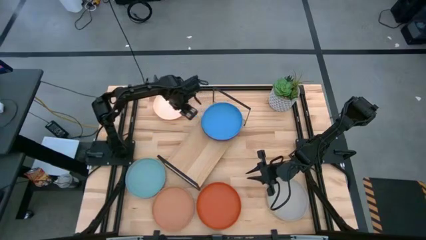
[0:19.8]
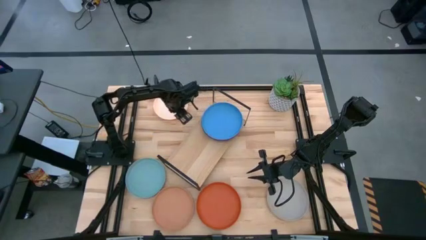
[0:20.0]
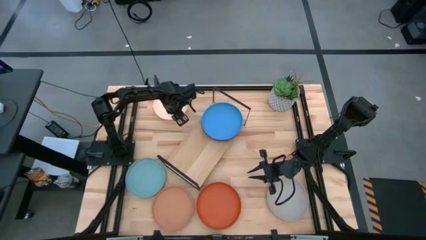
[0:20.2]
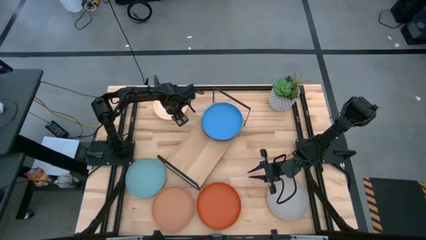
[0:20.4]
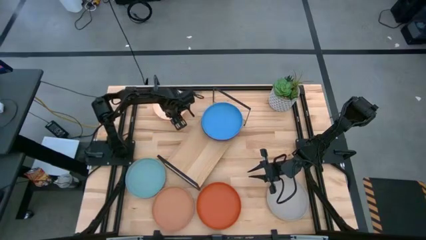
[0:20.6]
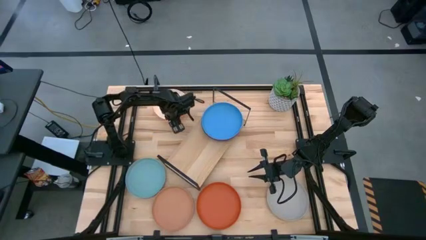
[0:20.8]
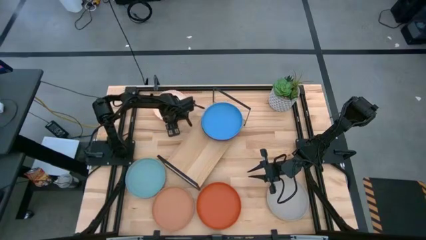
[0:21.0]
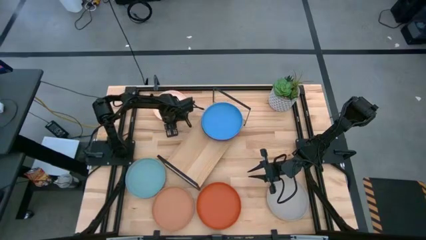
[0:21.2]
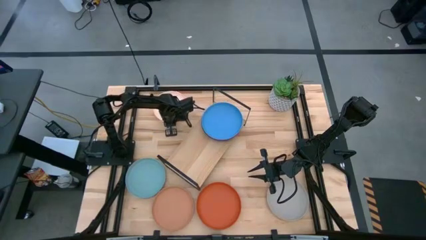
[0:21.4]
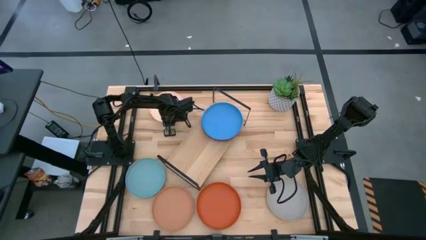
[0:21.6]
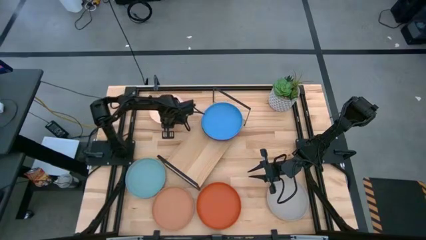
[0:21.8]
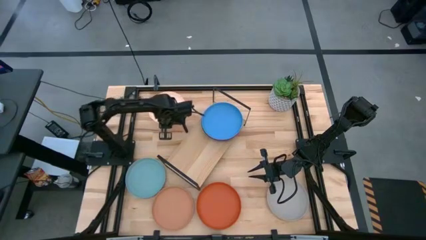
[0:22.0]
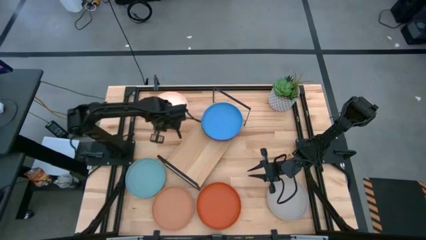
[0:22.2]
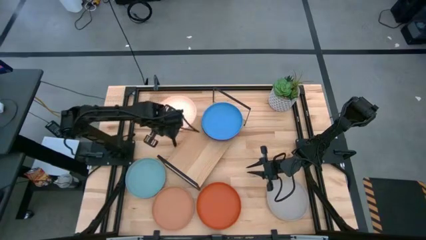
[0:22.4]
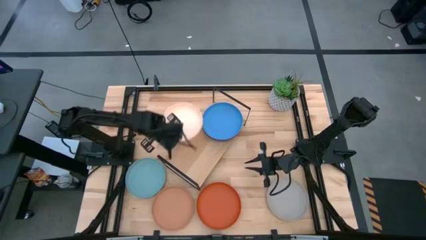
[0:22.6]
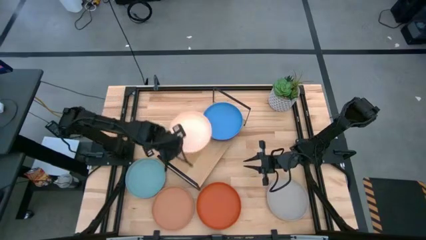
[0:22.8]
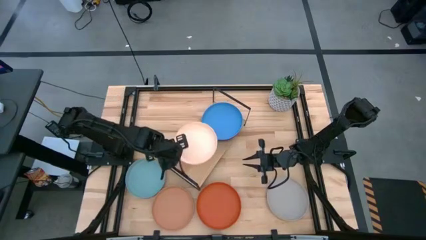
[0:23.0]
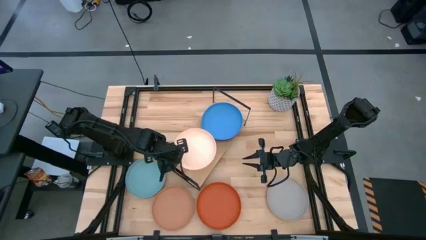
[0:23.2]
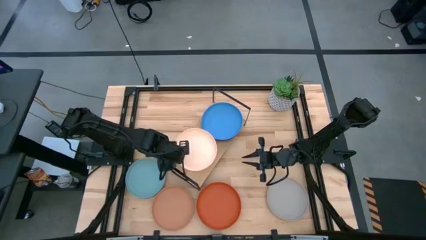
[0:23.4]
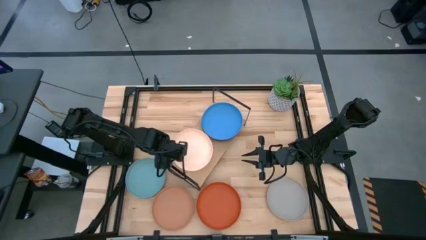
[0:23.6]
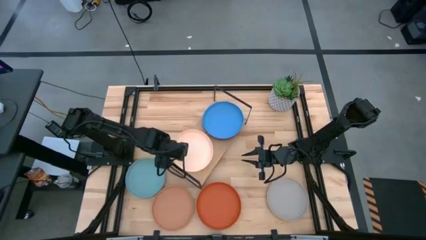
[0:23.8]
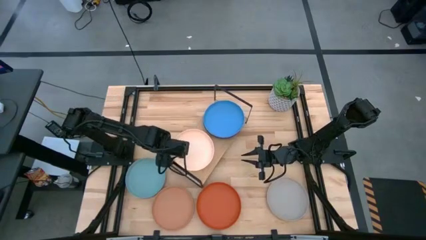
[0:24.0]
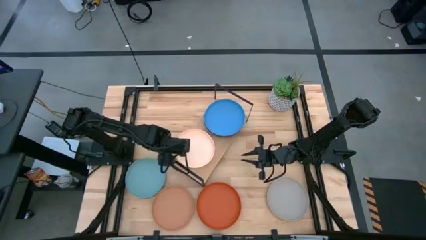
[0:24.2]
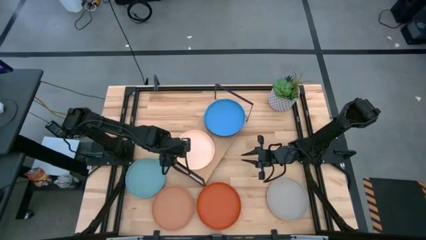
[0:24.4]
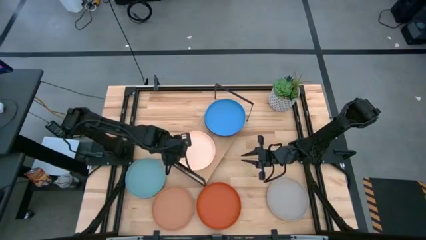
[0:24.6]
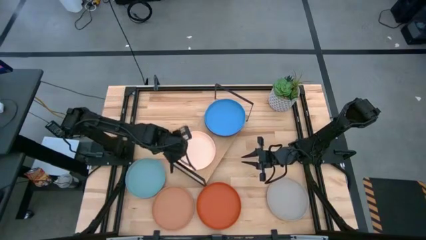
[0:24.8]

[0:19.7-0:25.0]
Task: Place and stack plates onto a shelf
Put the light orange plate on the shelf

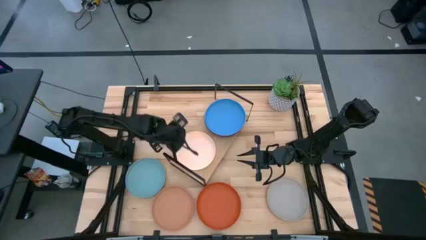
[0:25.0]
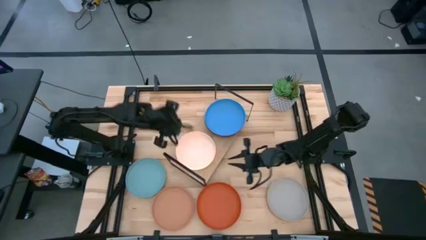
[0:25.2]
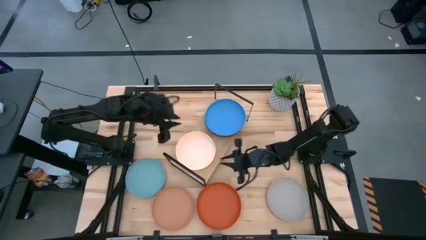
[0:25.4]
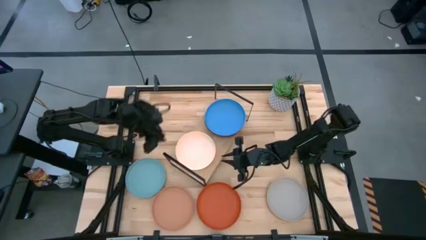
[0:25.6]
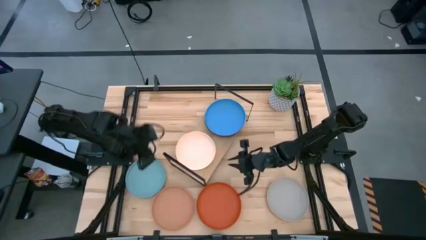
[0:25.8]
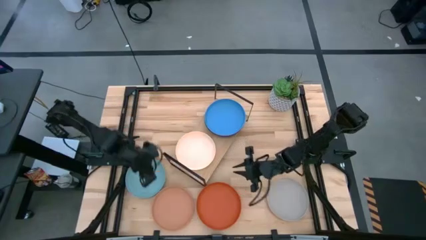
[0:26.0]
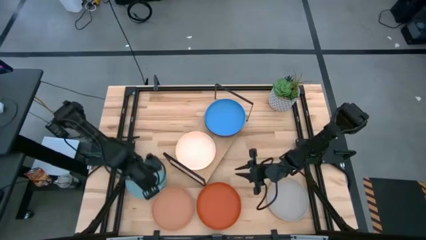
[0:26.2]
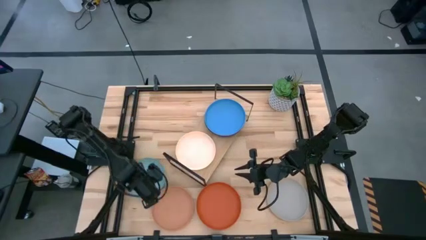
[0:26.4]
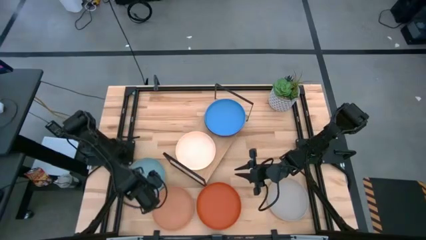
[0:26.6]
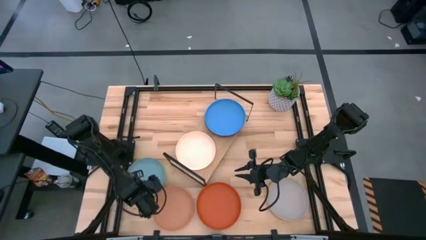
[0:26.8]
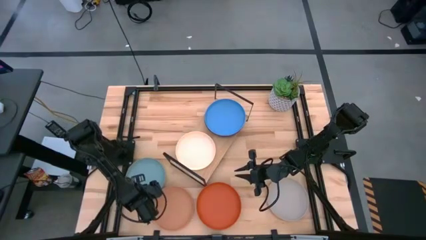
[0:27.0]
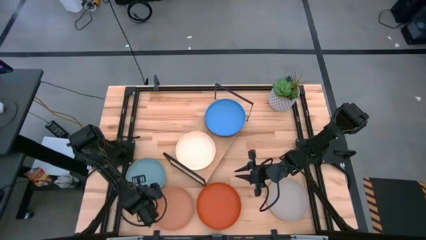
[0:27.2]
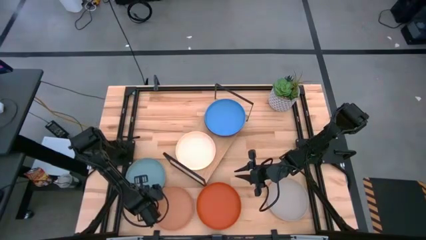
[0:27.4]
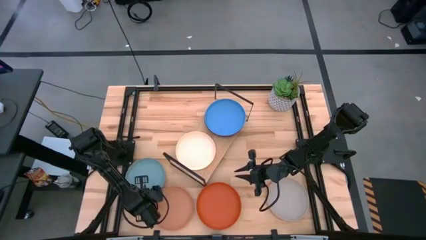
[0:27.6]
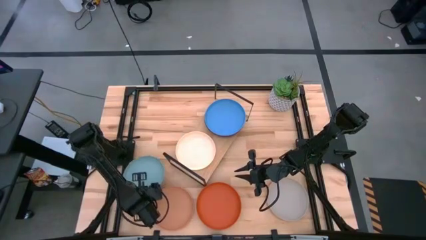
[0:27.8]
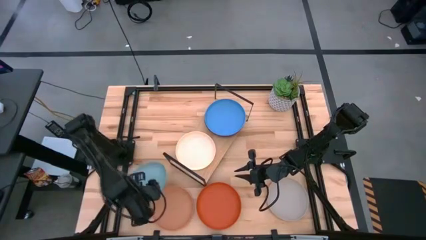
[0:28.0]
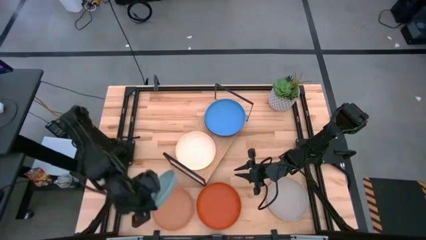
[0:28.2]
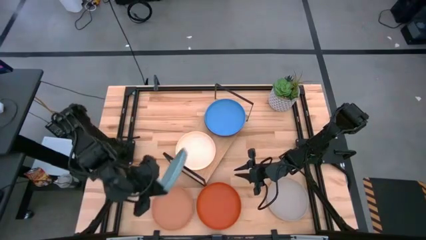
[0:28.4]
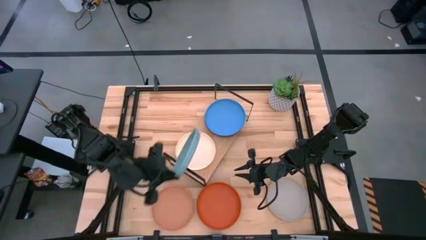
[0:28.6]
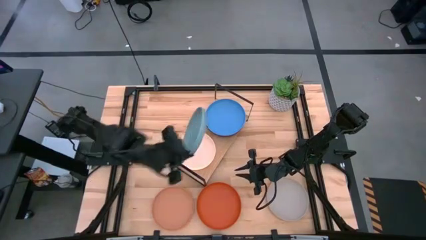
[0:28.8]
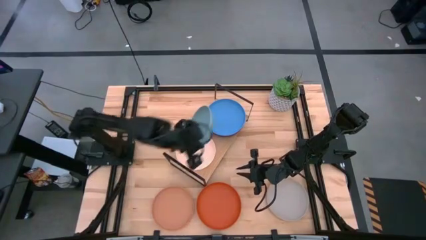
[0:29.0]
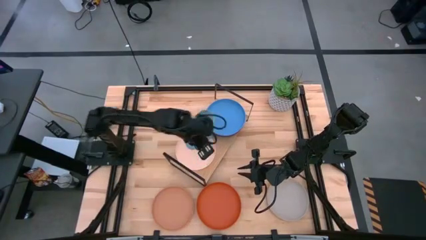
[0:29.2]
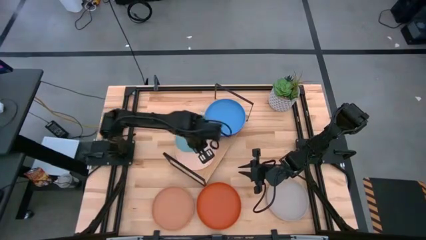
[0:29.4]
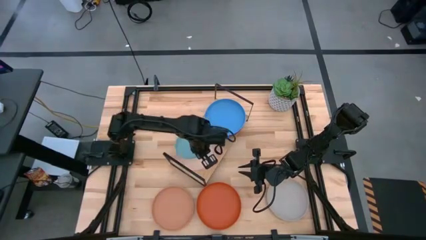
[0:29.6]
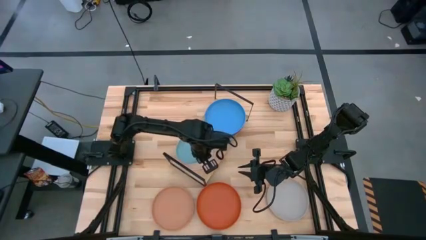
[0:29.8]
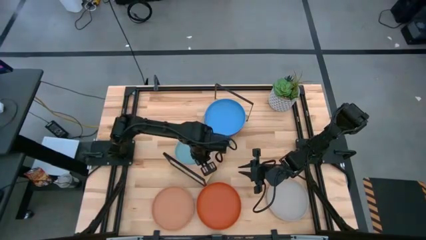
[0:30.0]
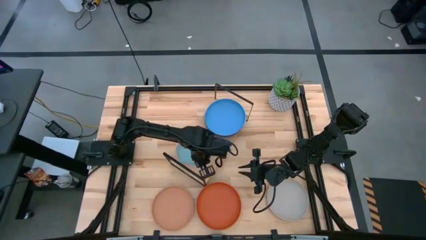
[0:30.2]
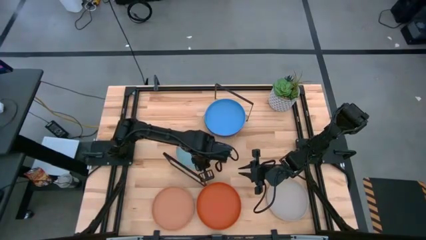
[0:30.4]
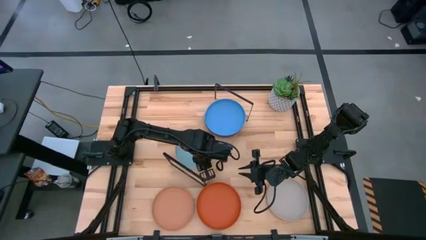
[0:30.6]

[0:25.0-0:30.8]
Stack the light blue plate on top of the light orange plate on the shelf

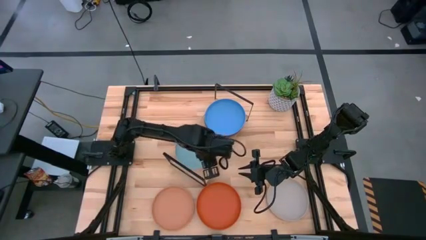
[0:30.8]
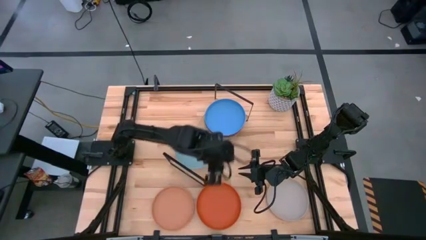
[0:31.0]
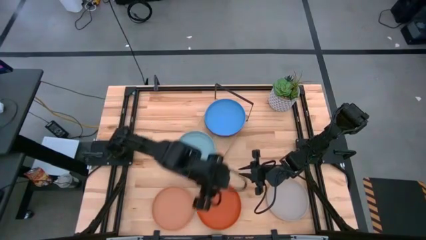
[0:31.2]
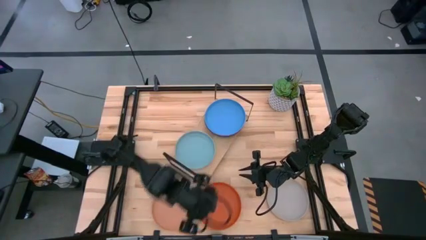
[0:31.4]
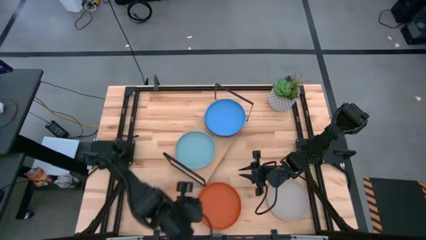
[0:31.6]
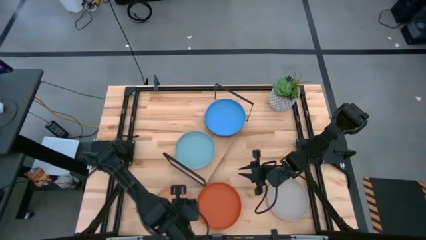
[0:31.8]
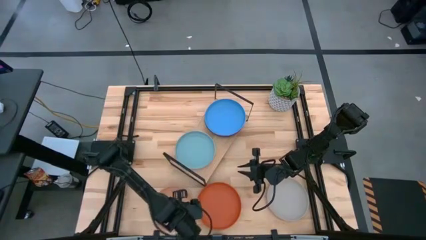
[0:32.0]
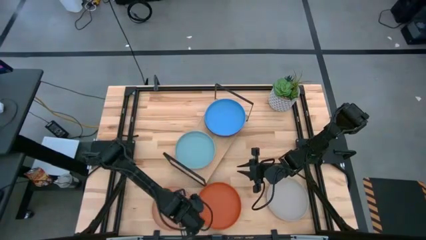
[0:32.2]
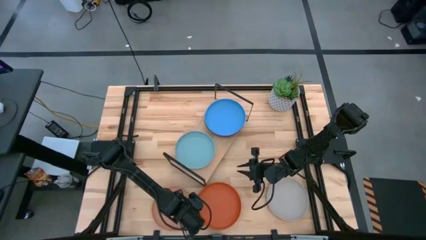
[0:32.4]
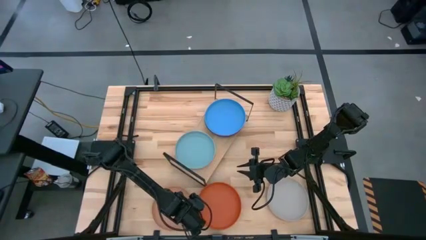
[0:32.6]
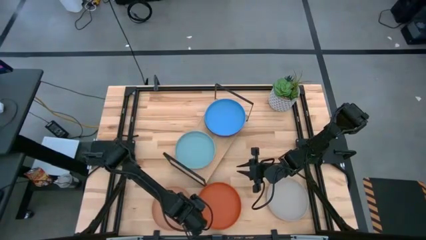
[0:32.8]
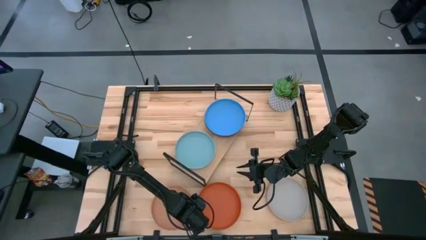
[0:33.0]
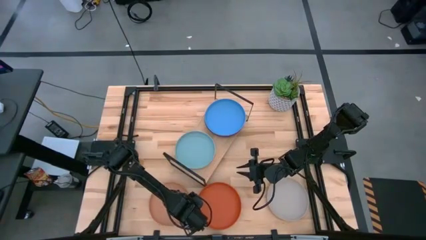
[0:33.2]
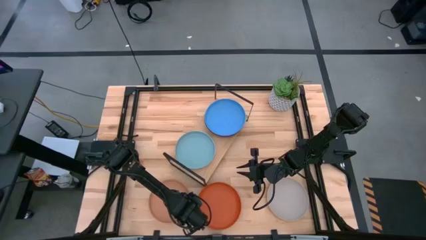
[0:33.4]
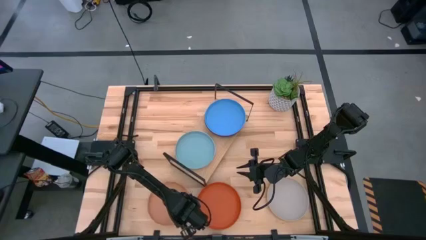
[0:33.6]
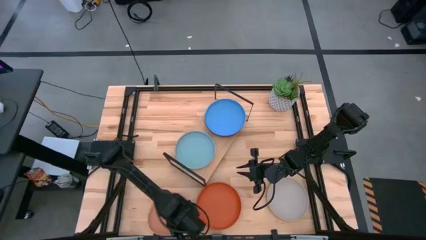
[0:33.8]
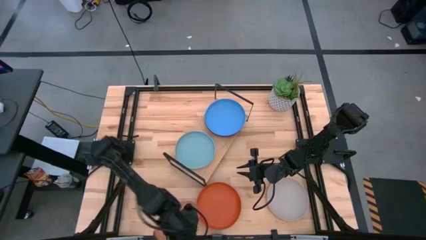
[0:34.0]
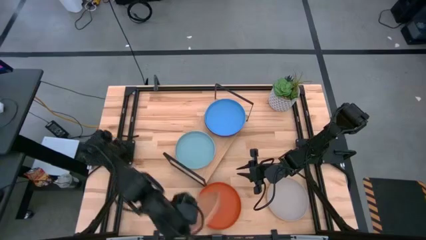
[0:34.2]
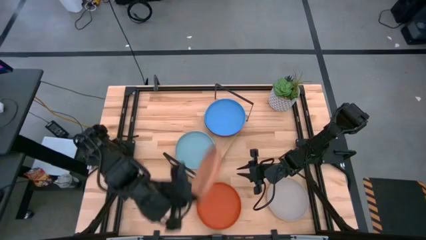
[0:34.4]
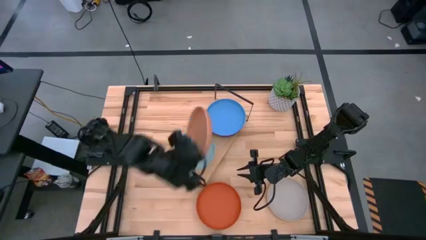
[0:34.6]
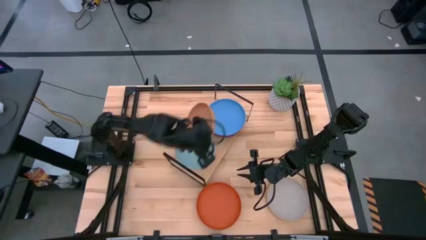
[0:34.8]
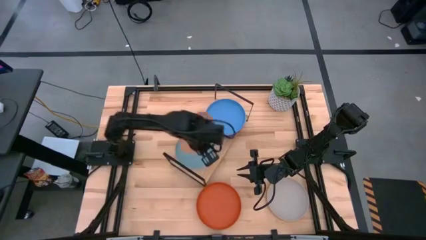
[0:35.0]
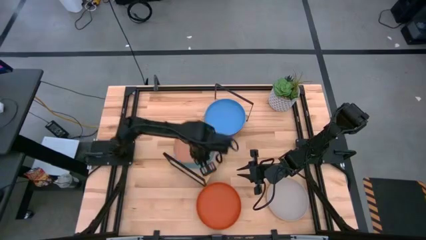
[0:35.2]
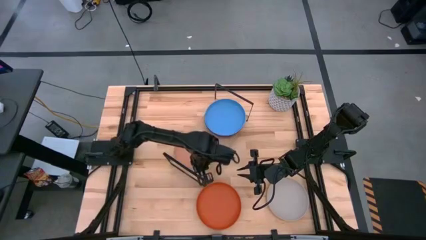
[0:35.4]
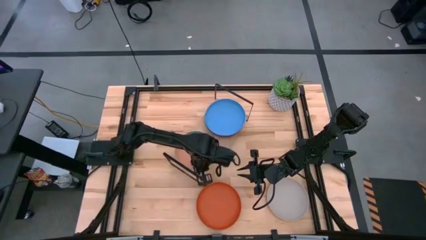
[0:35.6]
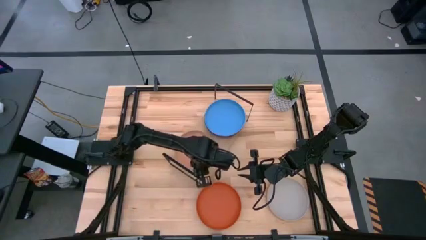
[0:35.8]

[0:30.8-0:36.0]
Stack the brown plate on top of the light blue plate on the shelf

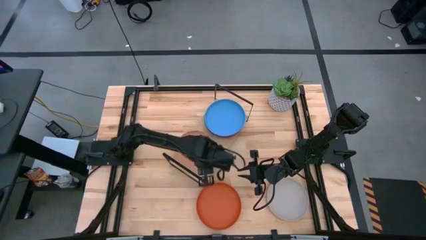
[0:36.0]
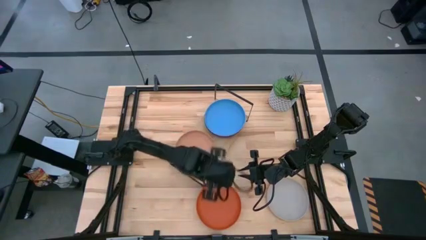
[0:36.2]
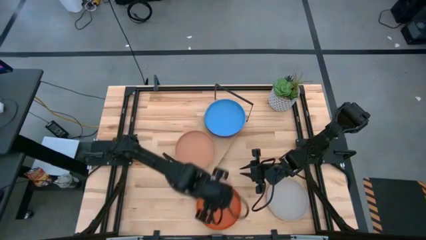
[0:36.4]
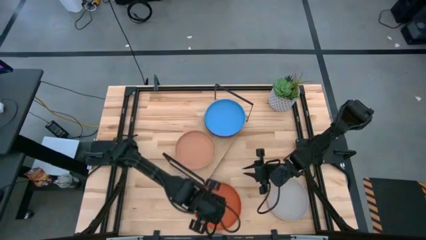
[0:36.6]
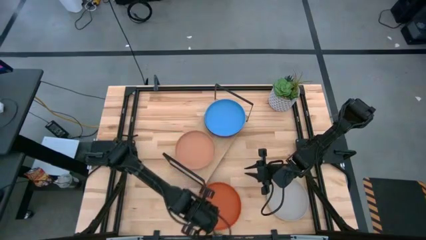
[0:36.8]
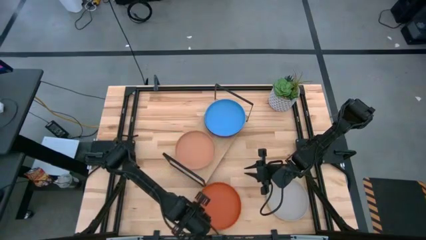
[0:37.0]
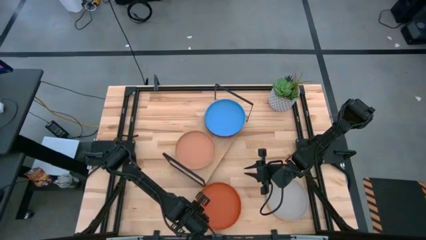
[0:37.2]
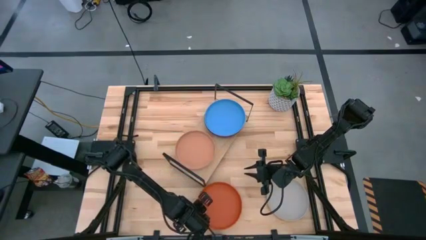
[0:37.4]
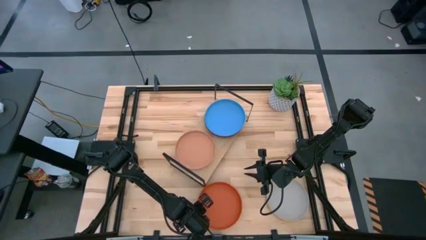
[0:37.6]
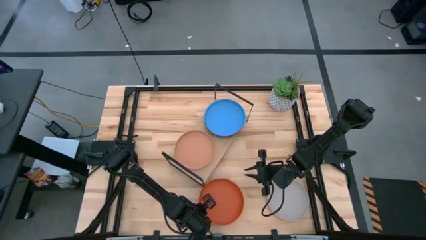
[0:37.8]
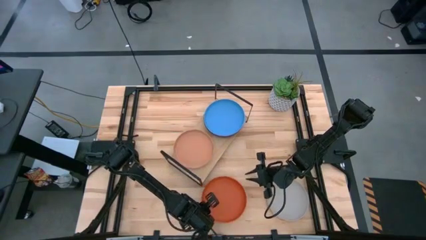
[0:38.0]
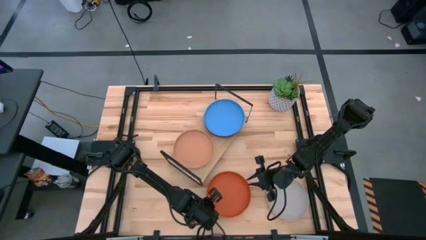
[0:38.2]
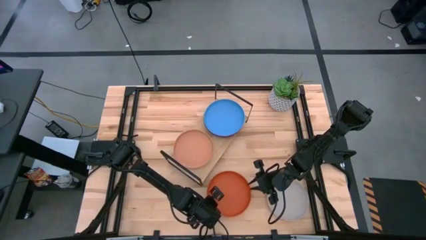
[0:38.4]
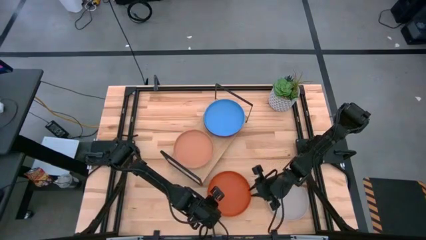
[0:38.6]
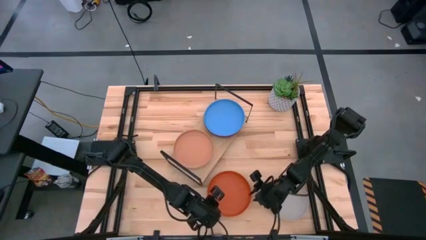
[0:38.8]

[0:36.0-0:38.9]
Stack the orange plate on top of the blue plate on the shelf
